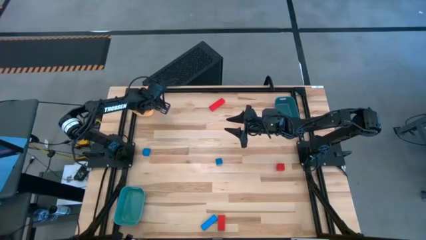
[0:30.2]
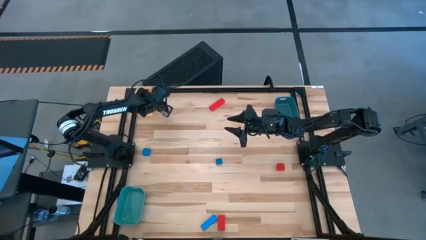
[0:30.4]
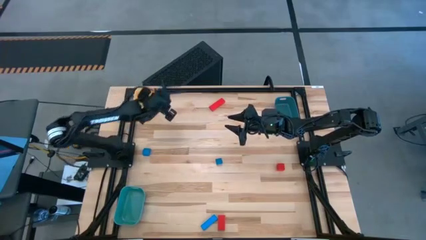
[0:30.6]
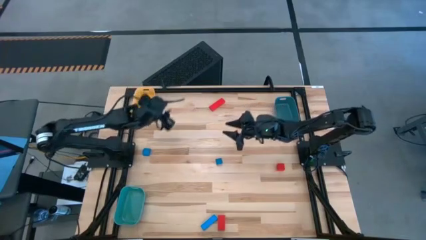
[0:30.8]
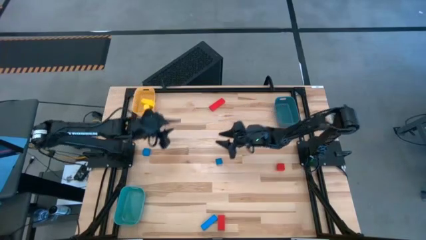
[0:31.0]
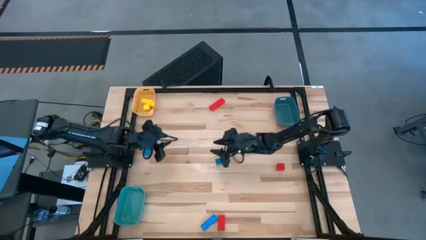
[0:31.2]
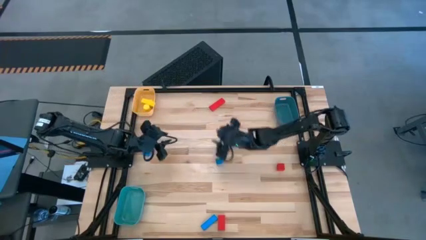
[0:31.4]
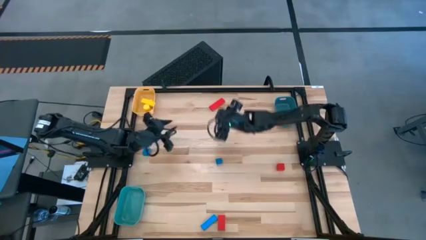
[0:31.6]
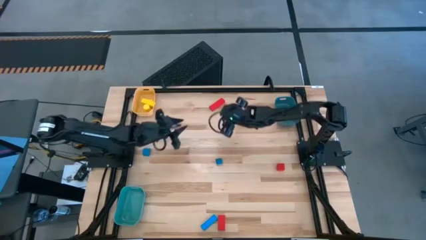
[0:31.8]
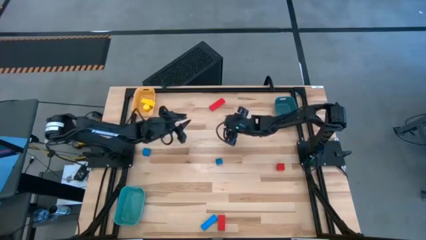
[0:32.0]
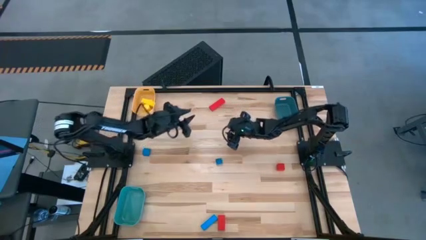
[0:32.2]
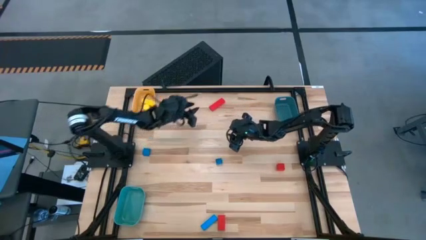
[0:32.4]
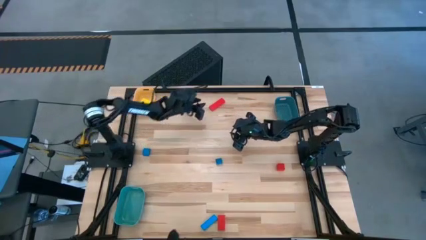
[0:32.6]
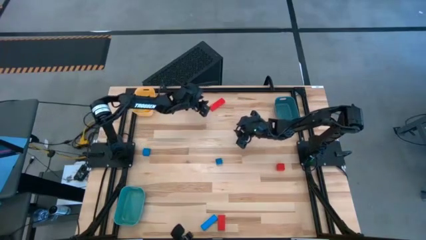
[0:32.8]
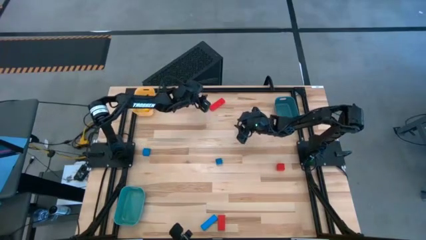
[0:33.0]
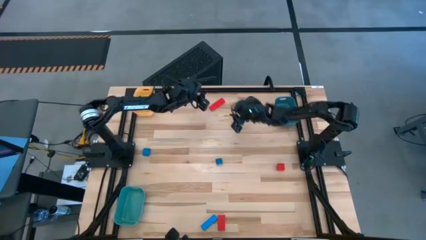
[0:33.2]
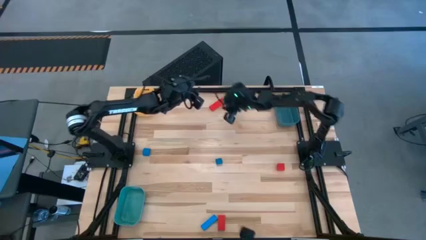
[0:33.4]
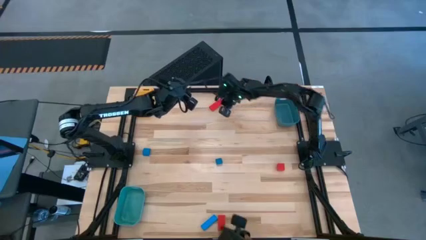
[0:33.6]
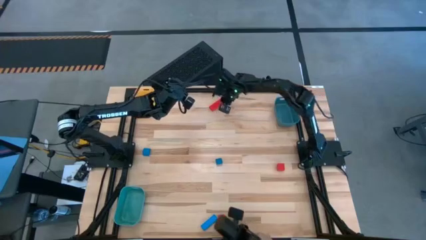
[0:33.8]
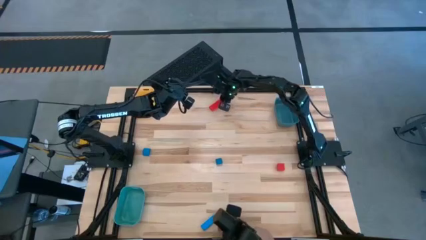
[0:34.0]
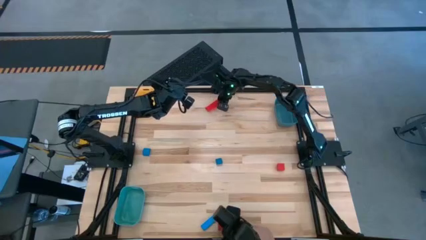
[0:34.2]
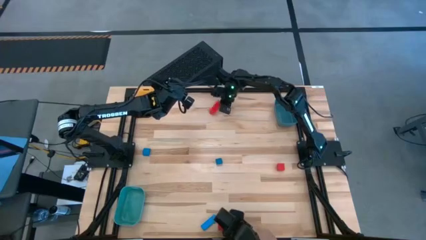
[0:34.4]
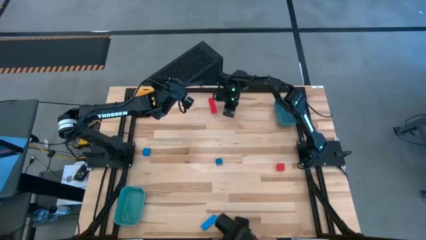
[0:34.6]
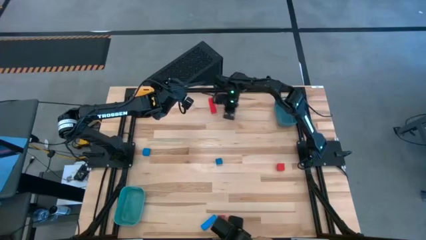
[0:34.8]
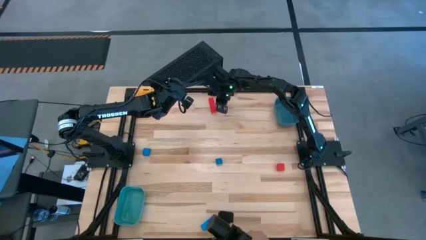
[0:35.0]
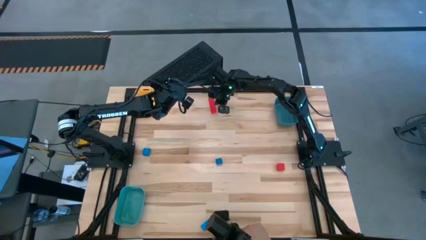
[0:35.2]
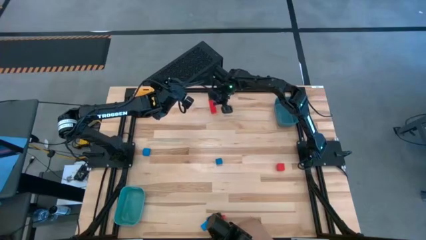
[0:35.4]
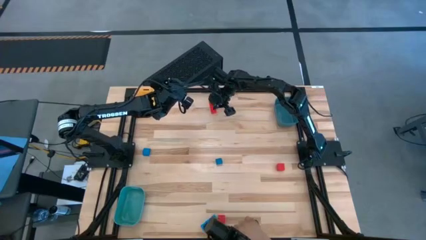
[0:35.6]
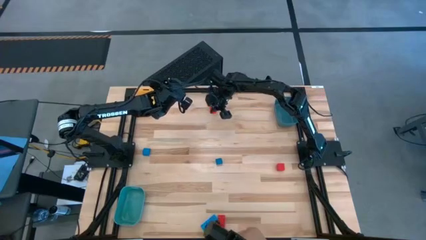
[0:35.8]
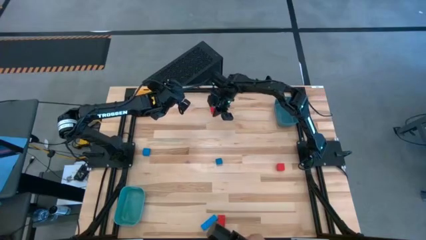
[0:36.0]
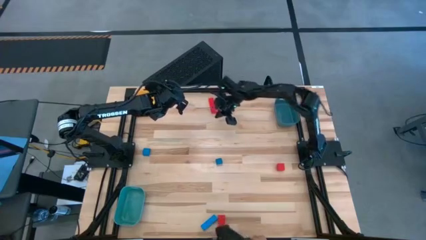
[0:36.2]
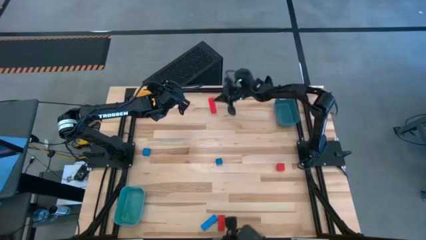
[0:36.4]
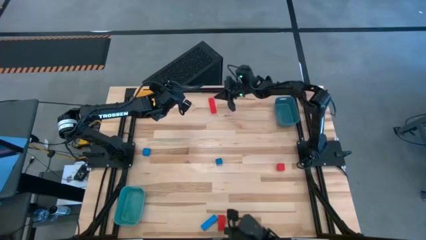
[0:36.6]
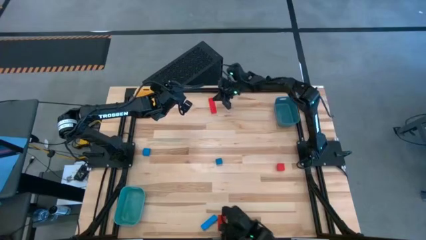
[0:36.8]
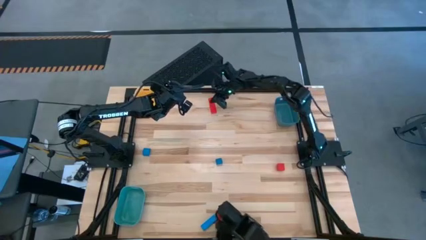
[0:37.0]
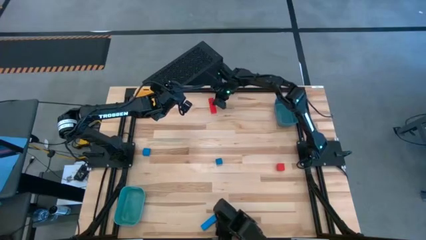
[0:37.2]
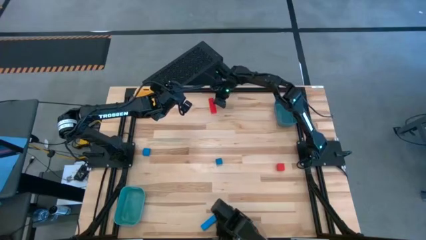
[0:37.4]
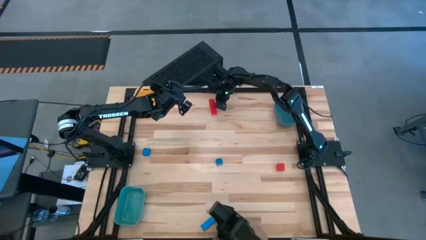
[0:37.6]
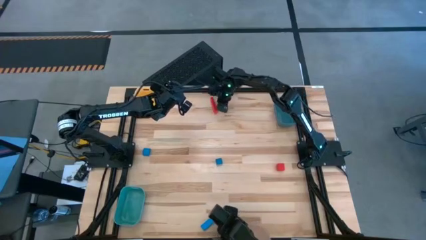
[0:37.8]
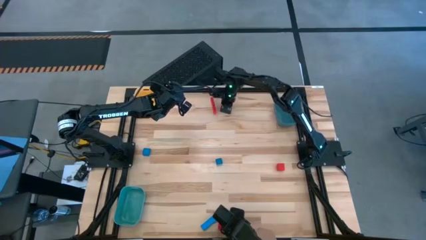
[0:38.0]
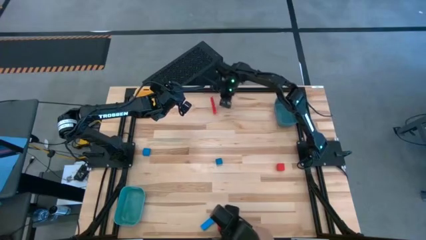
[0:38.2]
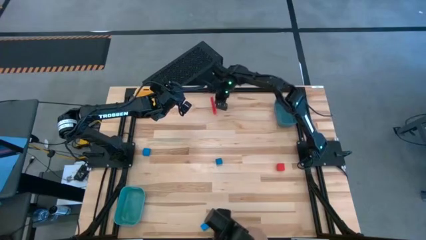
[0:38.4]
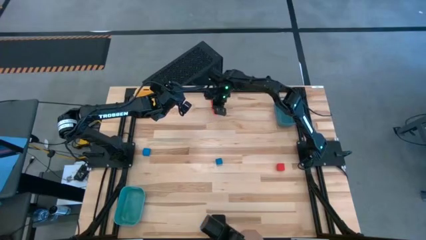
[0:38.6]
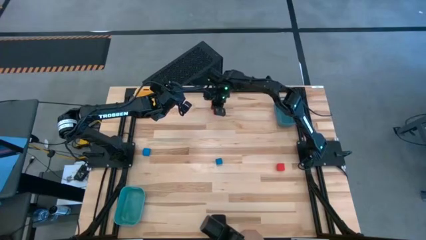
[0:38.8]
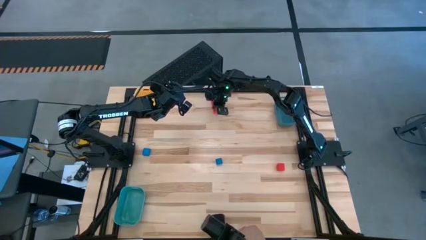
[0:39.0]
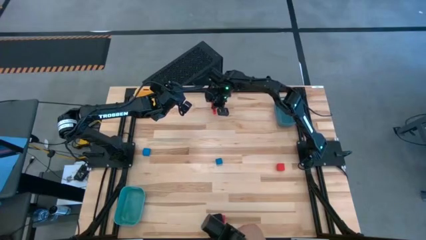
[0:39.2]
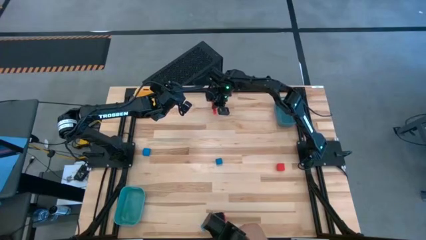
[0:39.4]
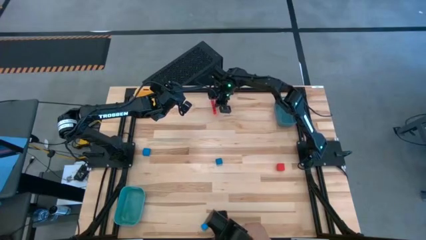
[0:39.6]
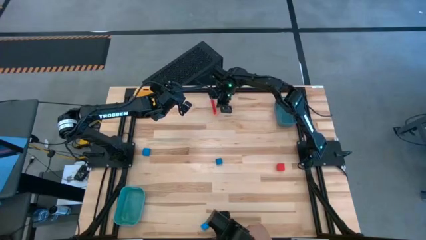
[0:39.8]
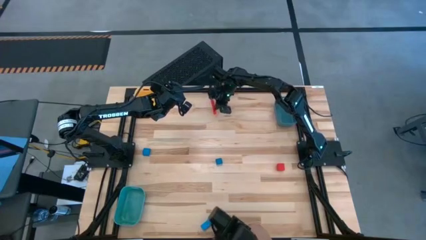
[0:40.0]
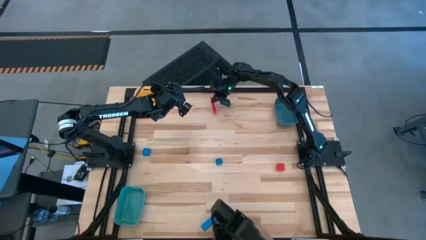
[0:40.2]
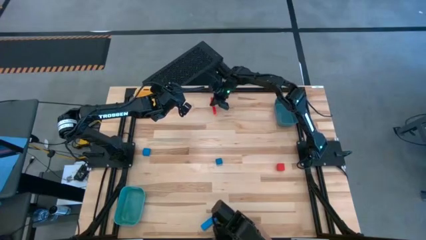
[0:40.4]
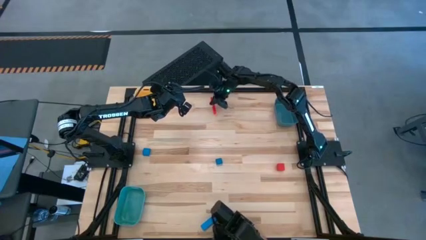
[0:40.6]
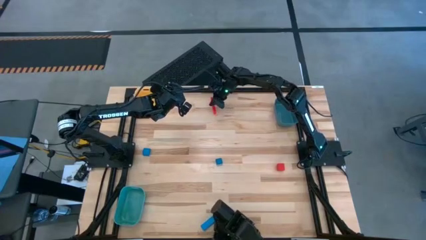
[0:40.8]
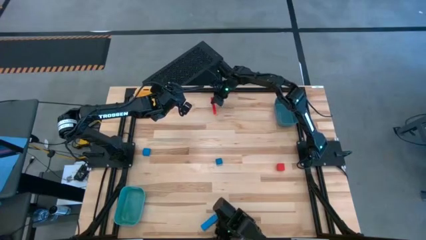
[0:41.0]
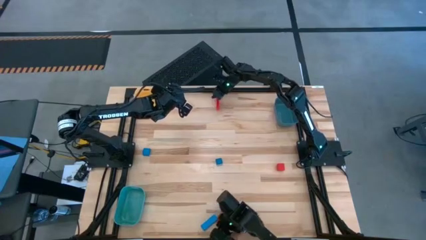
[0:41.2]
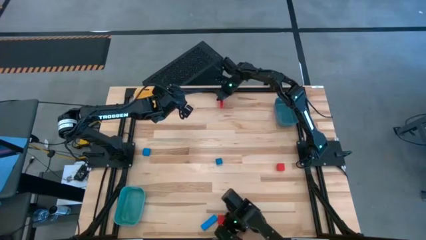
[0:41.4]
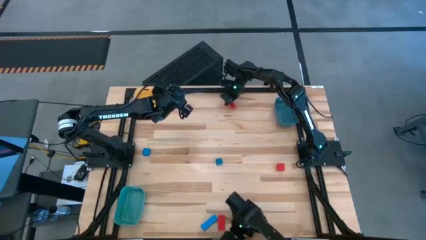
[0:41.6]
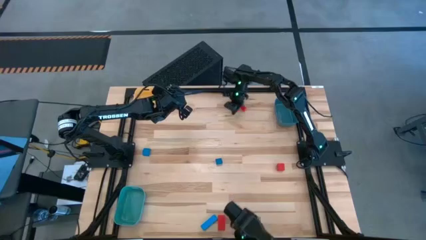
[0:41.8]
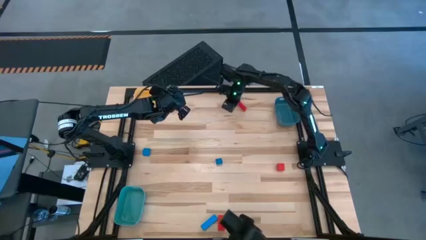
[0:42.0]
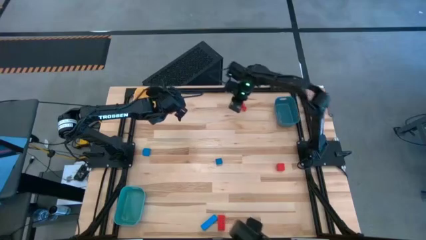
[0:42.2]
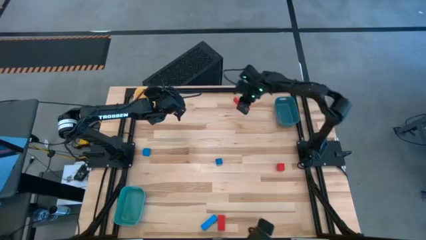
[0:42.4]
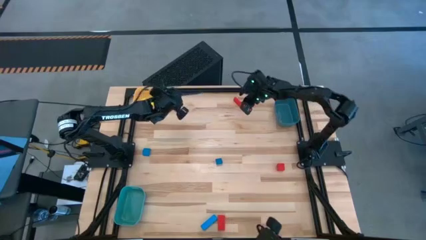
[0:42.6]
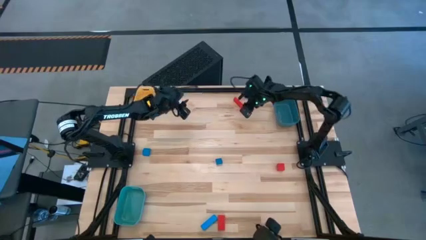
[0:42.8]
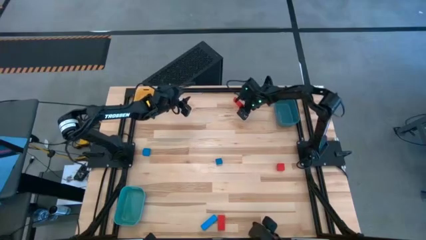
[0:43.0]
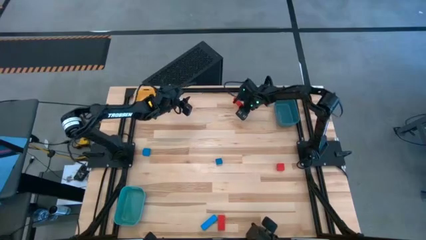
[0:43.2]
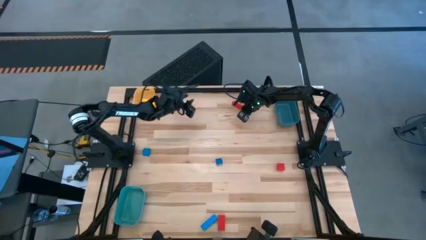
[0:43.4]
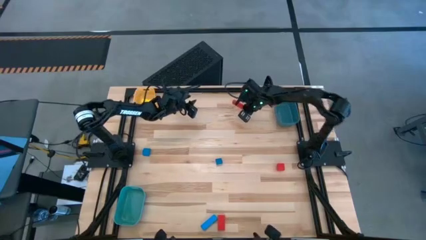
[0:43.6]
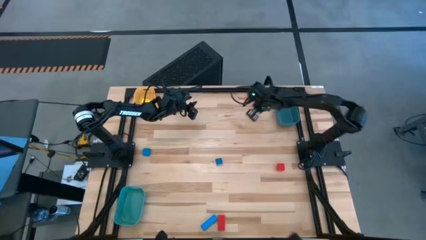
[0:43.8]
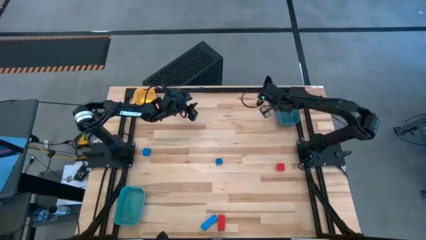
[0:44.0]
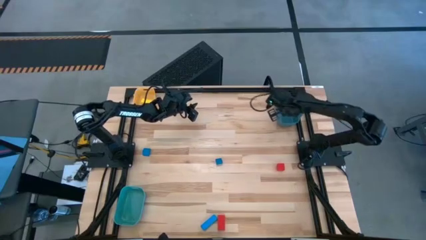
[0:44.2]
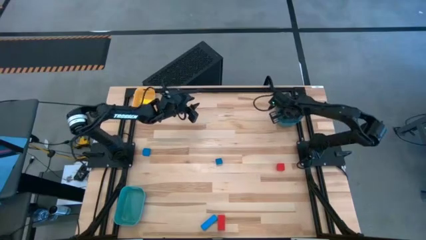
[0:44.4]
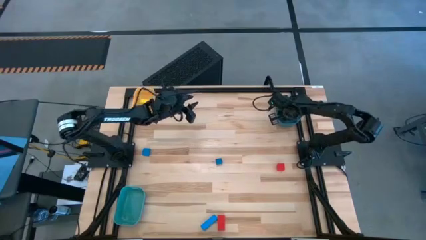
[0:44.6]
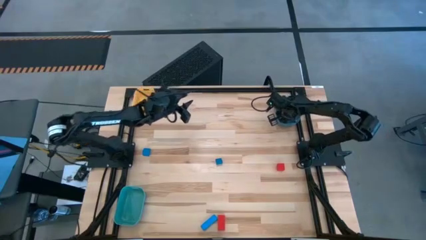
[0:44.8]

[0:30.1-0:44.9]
Task: Sort & place blocks by color
Put the top left red block into the dark blue bin

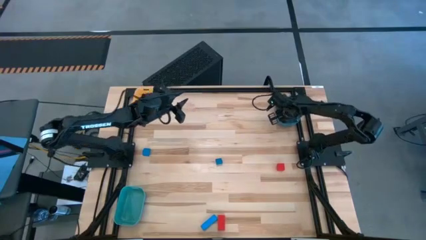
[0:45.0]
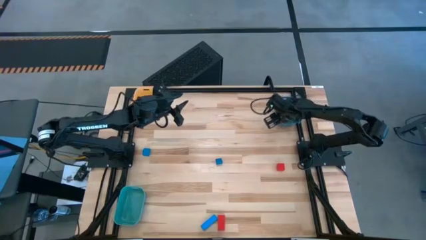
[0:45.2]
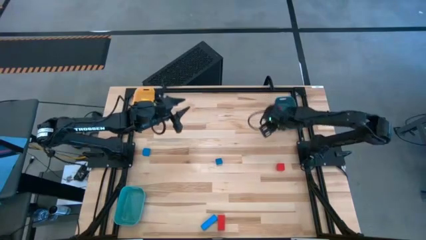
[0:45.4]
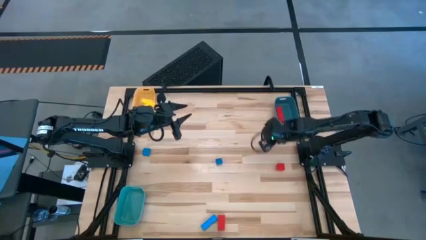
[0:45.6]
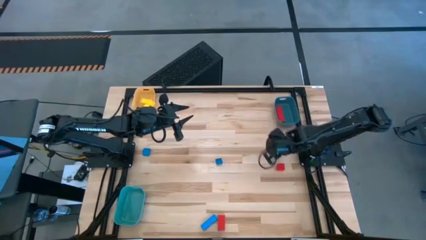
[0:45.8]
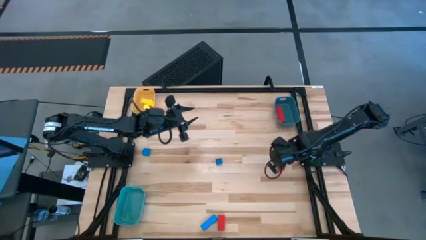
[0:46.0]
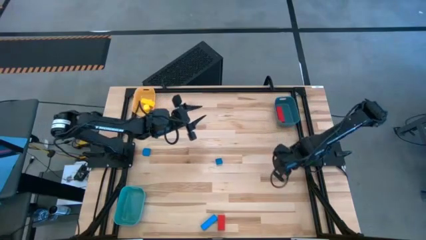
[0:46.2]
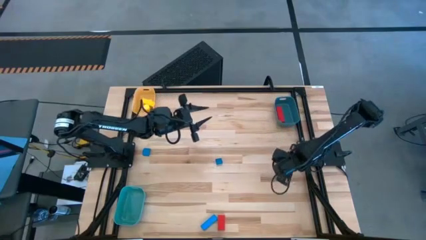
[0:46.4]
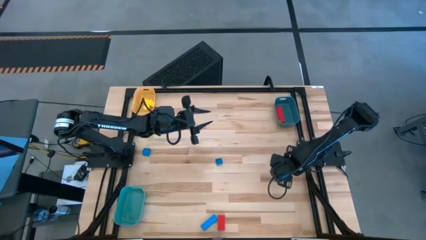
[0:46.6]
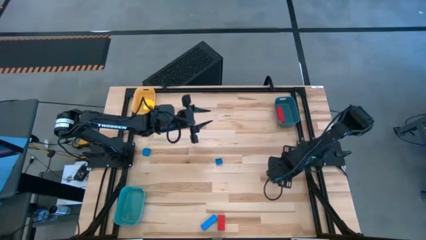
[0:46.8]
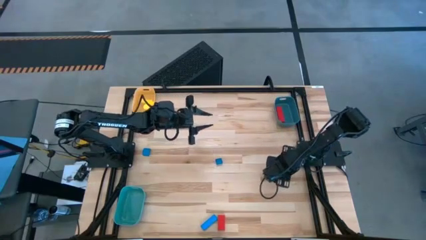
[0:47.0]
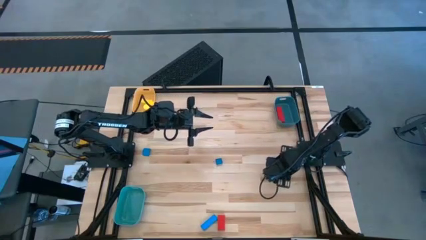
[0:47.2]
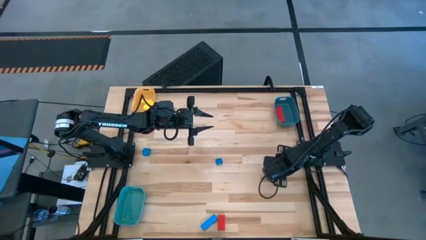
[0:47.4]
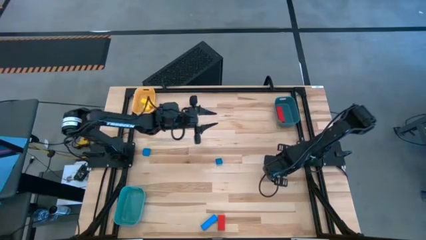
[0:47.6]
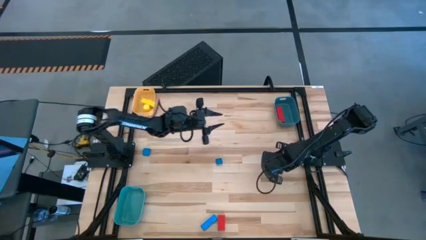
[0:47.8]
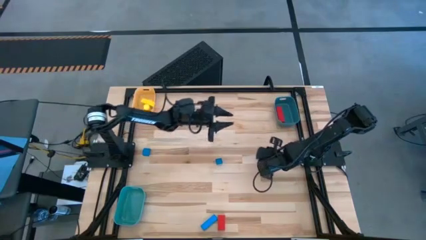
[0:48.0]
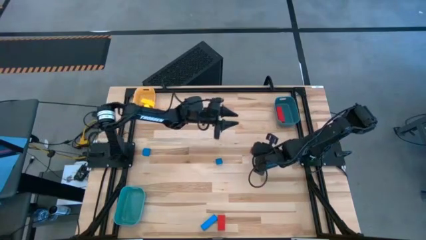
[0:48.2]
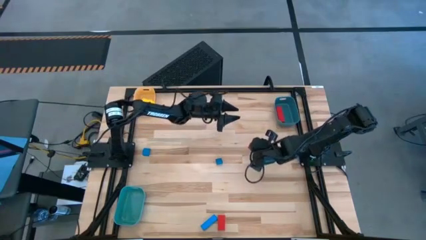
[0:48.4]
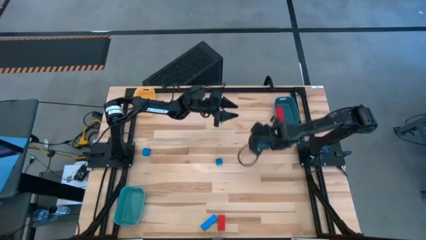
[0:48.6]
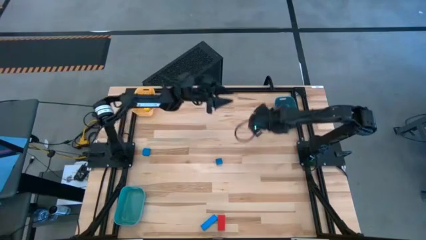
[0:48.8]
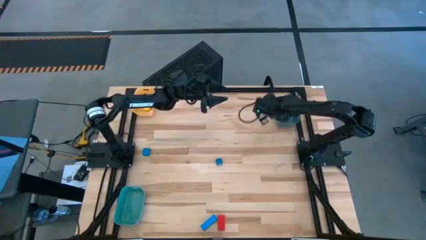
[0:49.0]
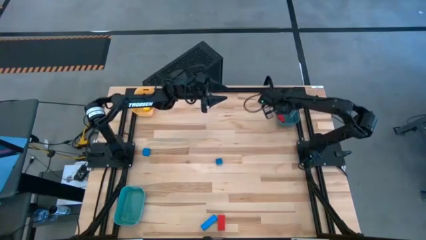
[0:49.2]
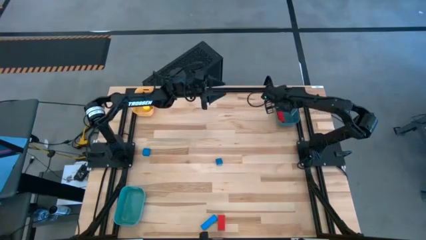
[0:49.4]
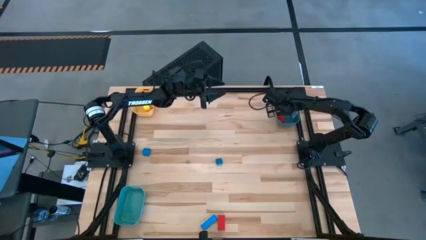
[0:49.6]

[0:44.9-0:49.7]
Put the top red block into the dark blue bin
